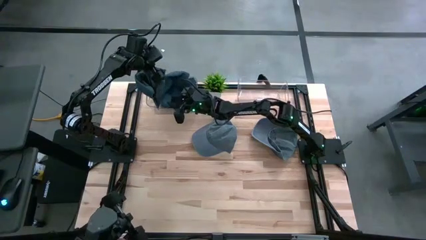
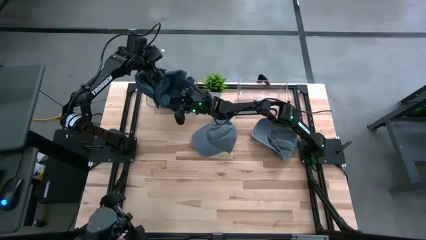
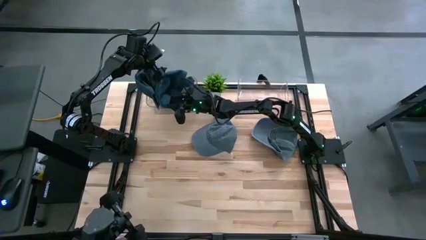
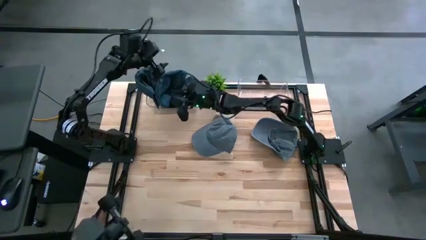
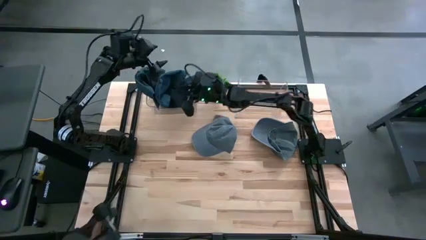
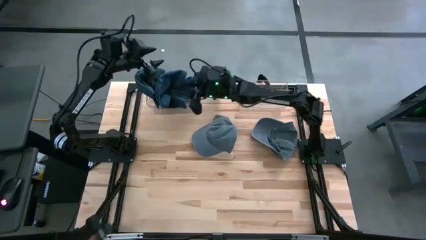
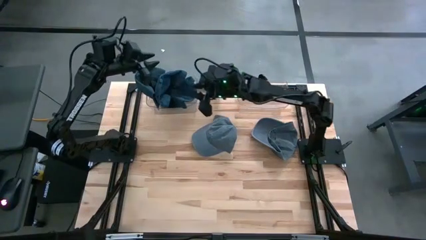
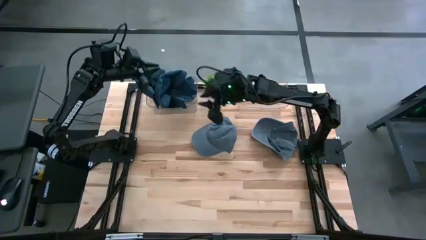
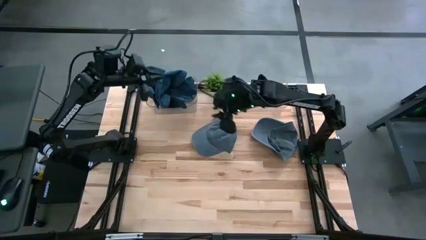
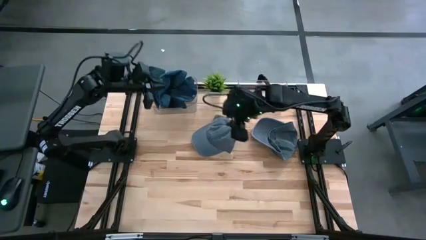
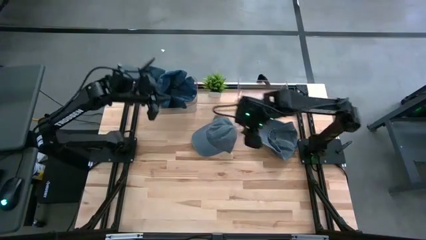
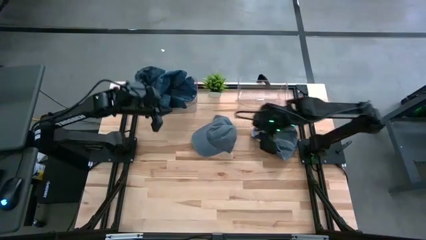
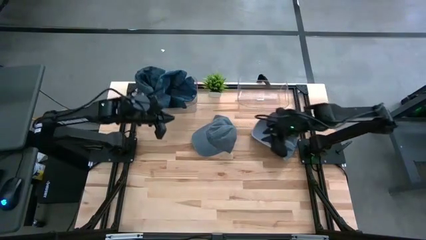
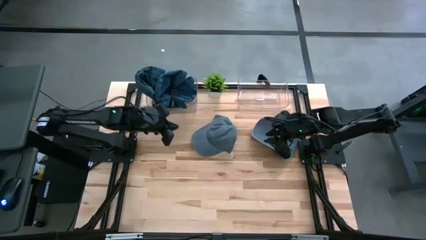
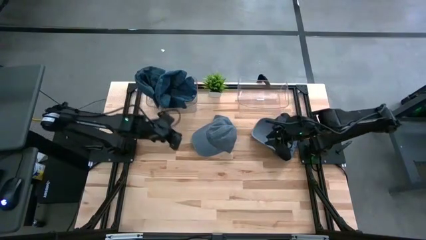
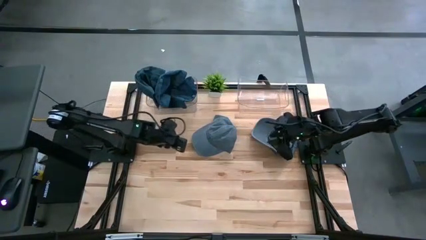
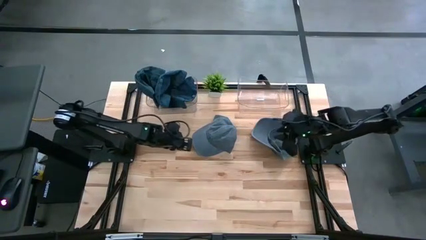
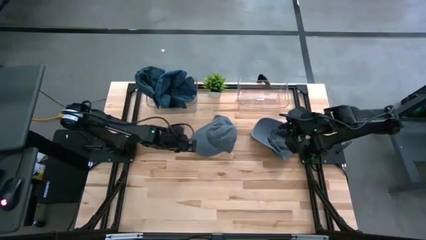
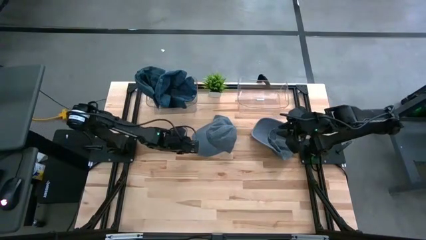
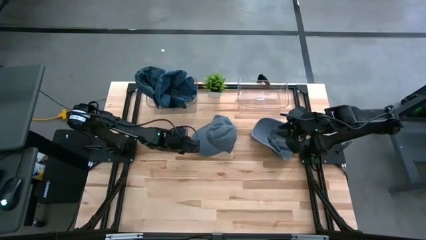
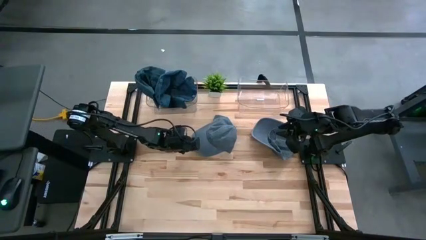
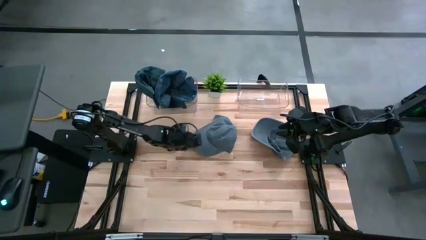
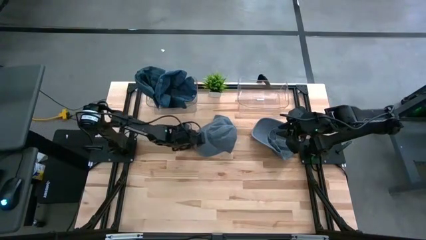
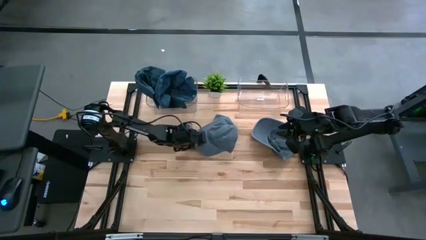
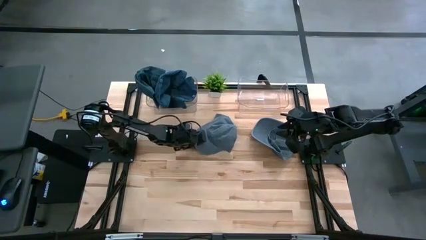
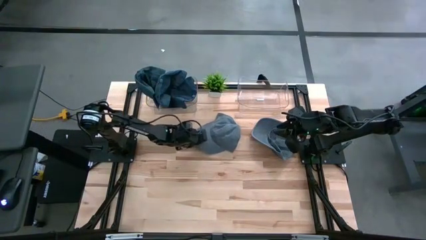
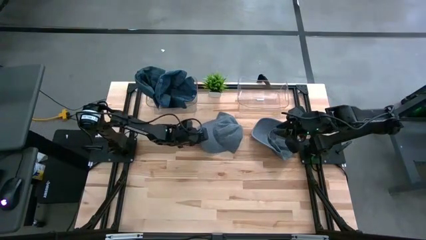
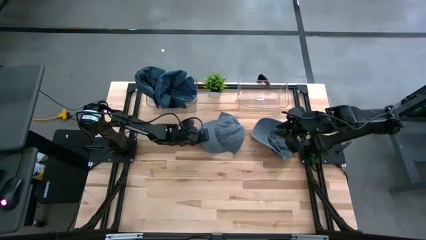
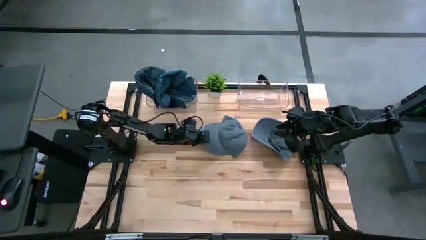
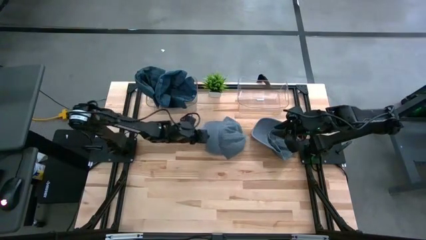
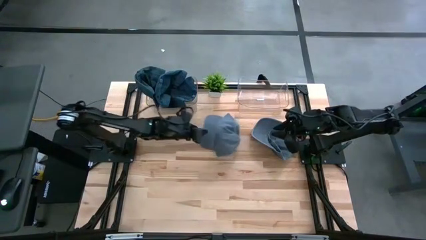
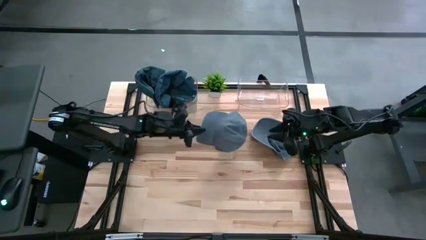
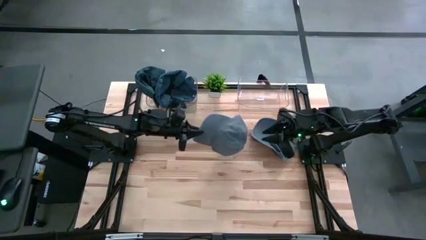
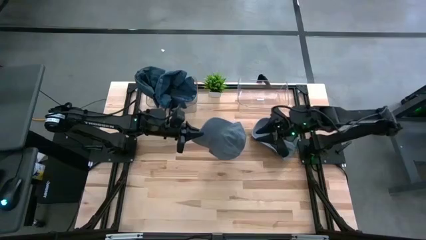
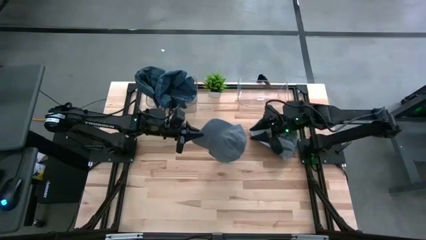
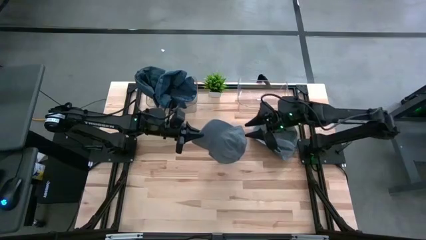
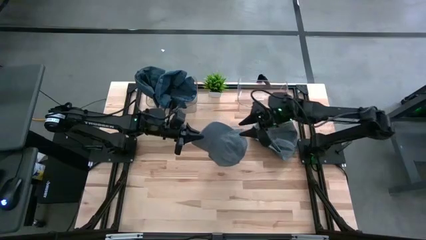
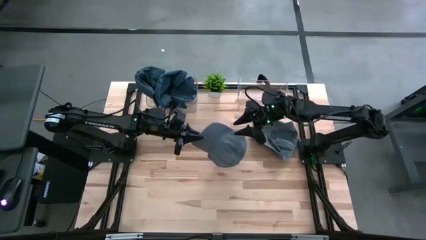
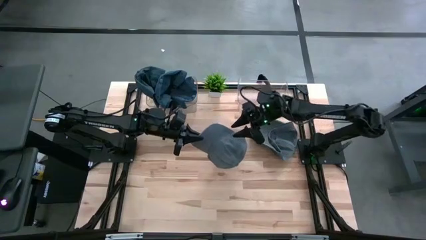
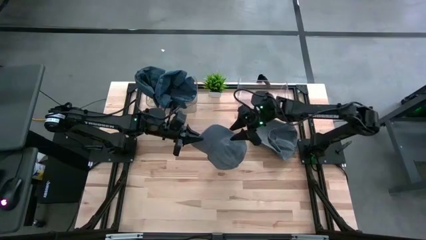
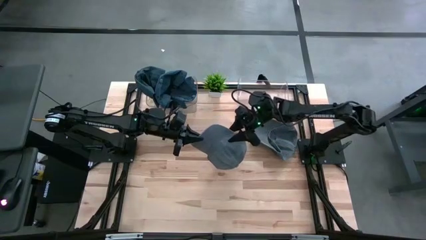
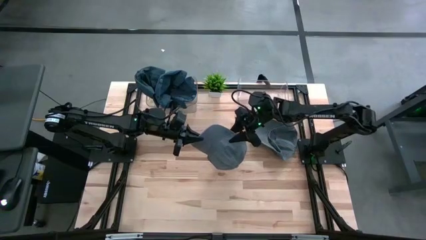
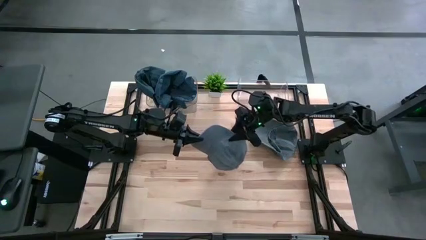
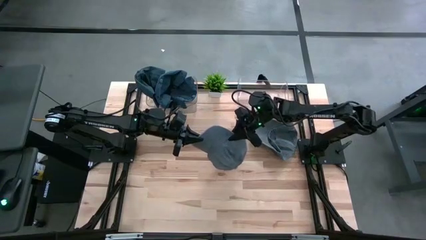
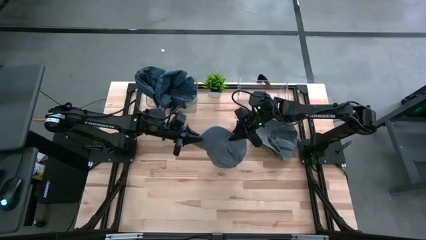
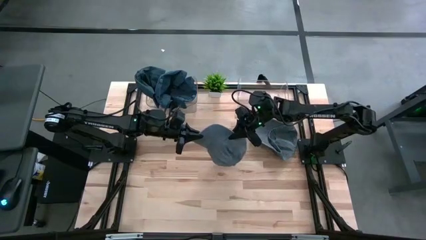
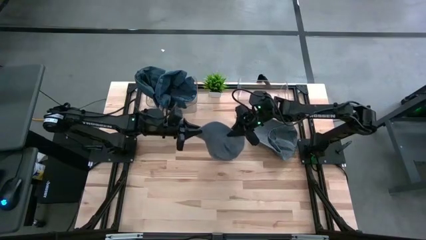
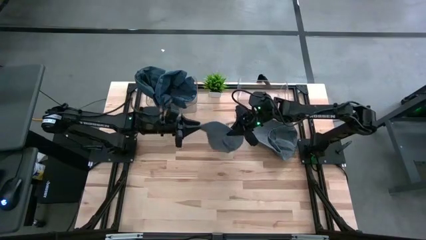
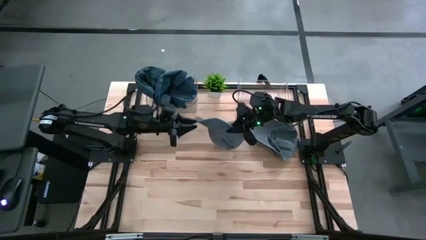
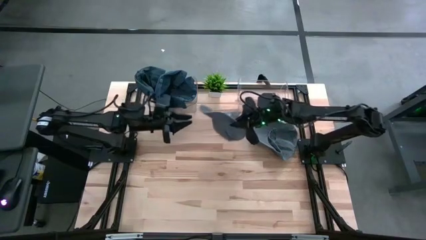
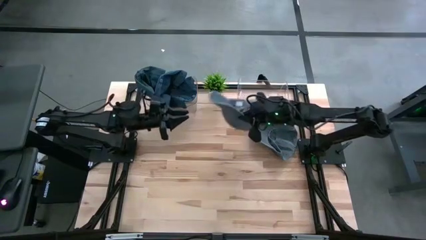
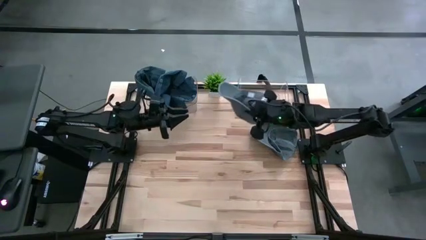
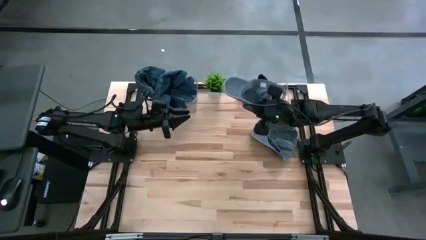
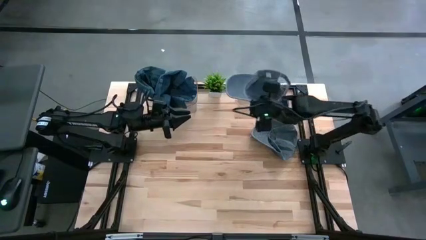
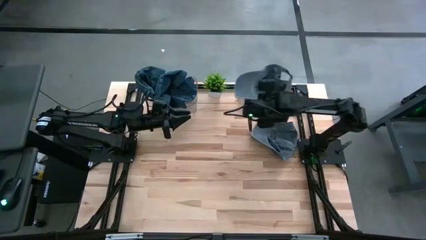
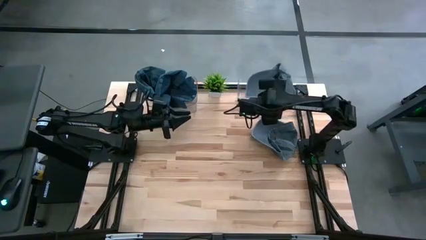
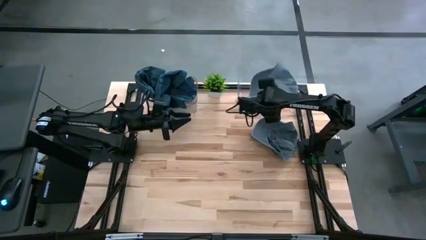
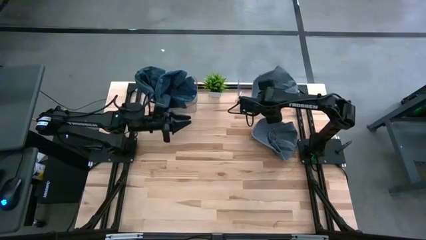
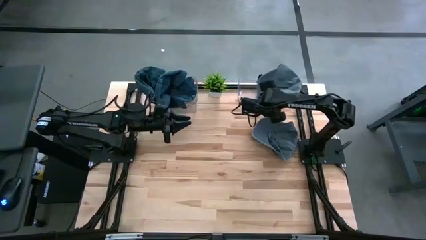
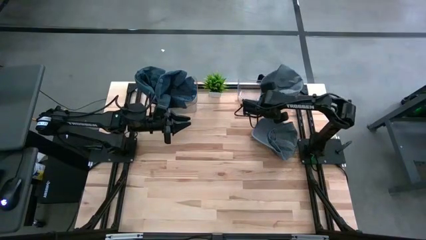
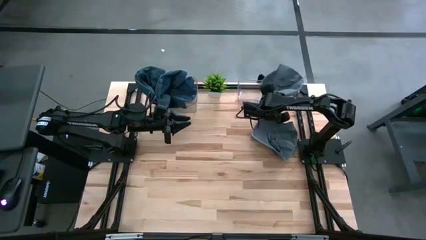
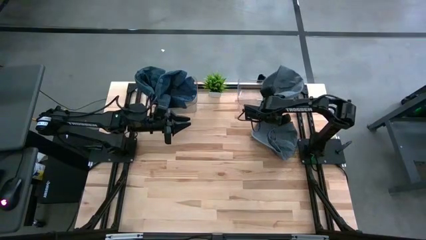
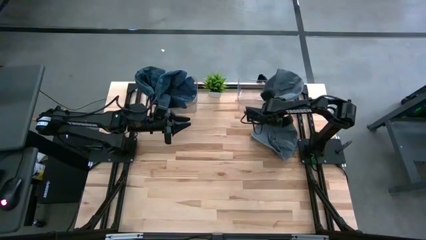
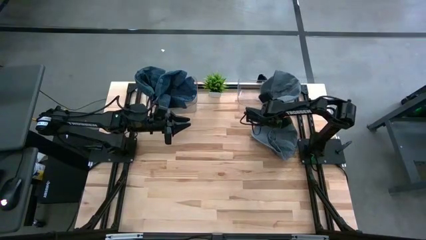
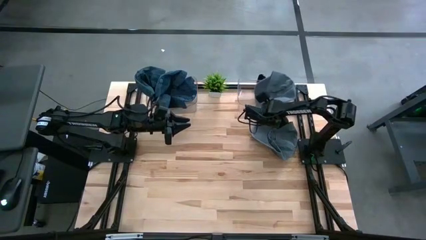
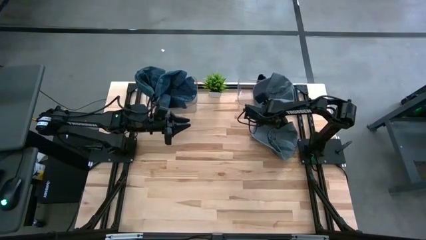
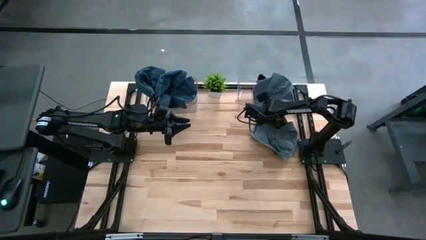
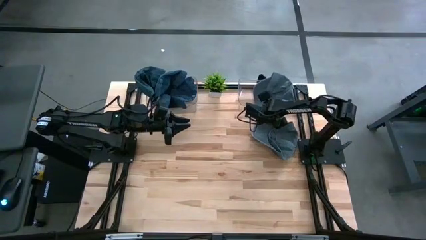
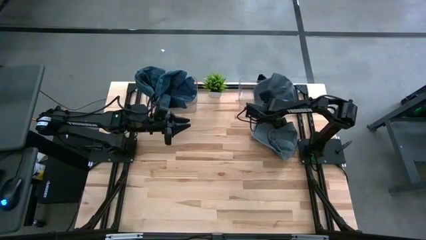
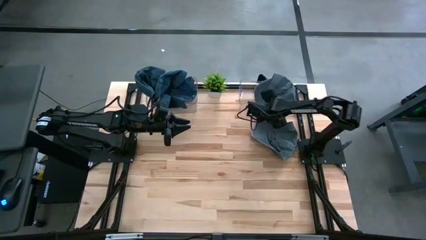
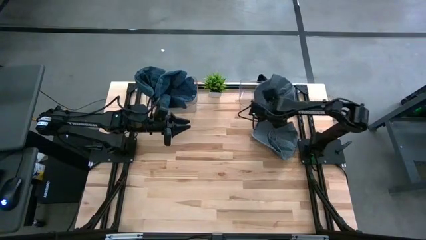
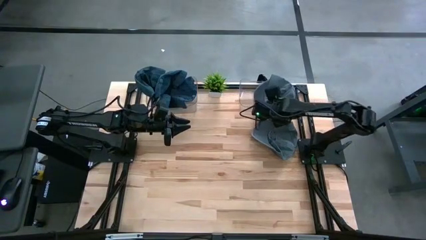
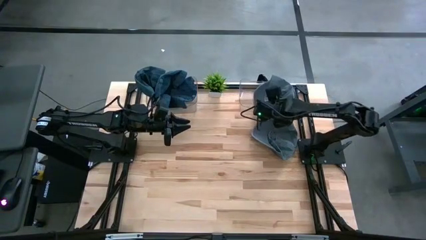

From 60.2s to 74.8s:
Task: Pick & Place hat
Put the left gray cap into the right transparent bin
